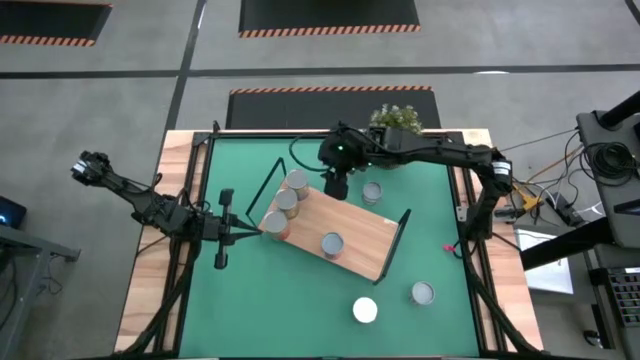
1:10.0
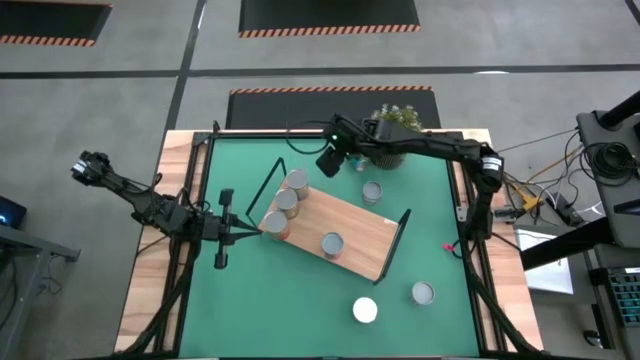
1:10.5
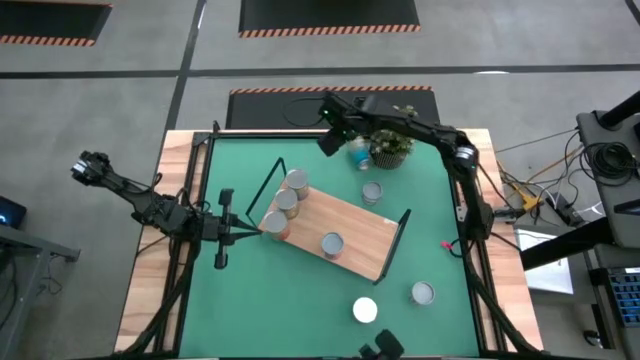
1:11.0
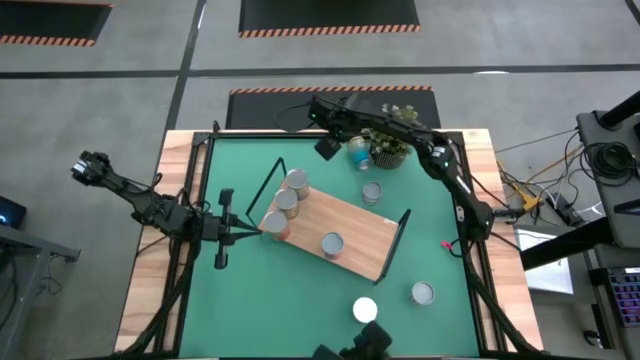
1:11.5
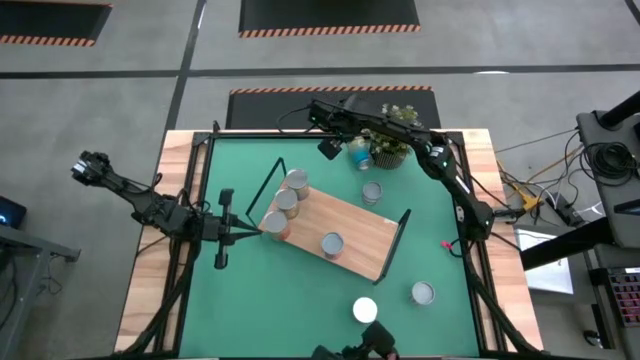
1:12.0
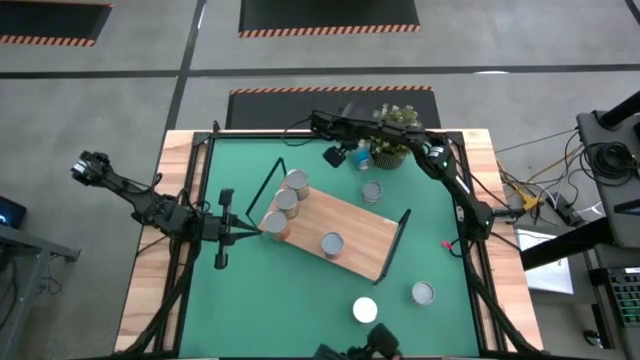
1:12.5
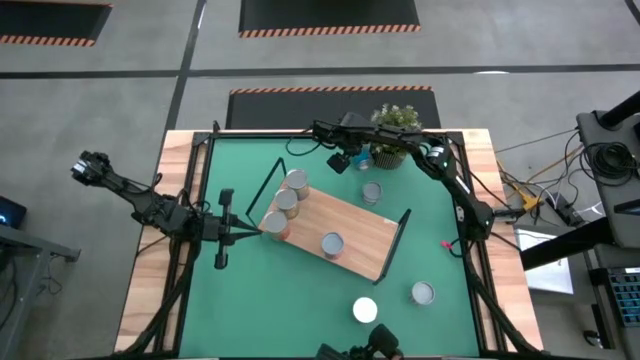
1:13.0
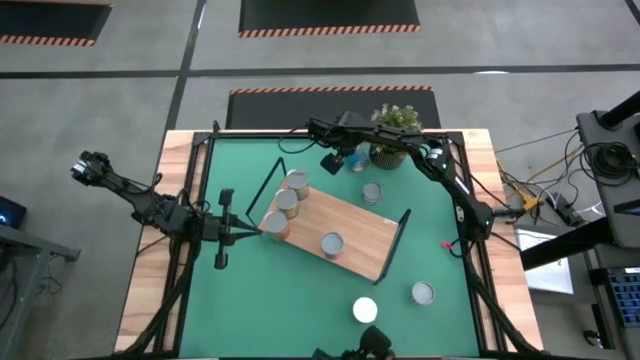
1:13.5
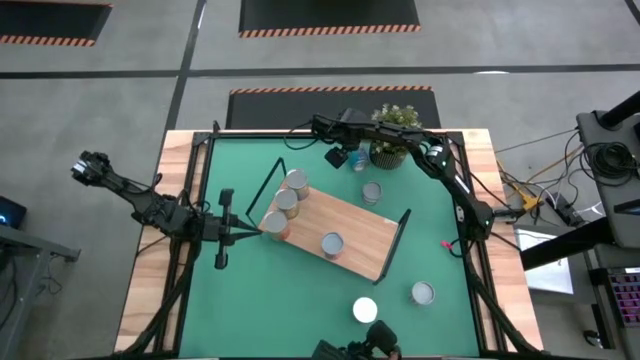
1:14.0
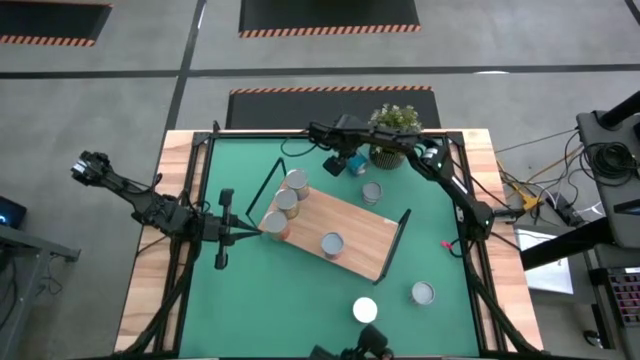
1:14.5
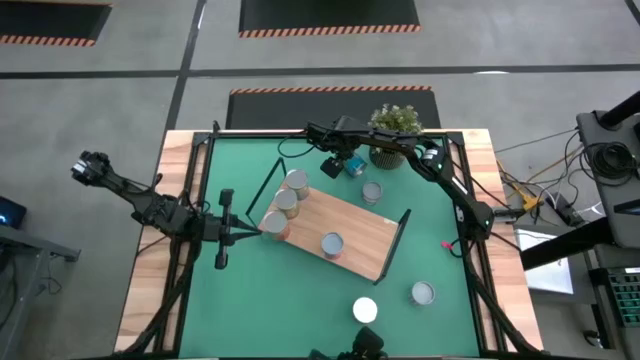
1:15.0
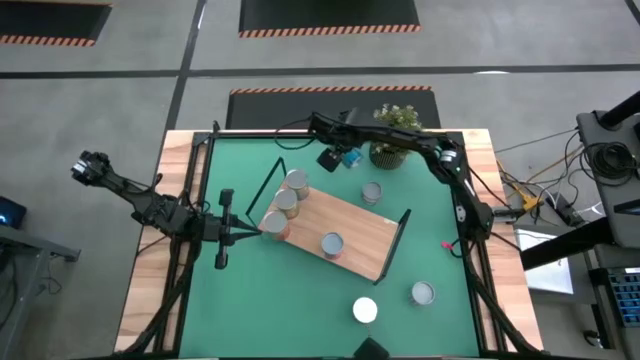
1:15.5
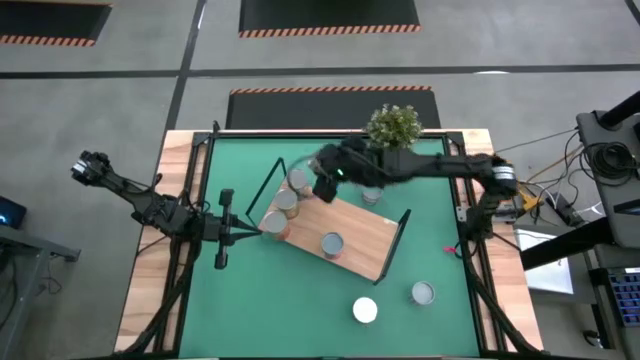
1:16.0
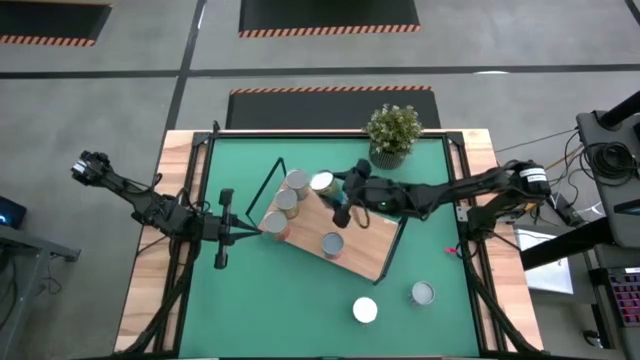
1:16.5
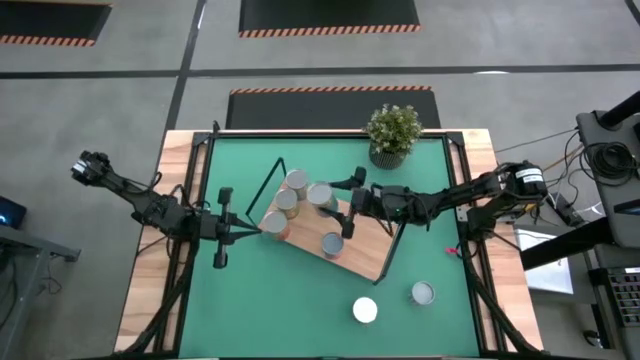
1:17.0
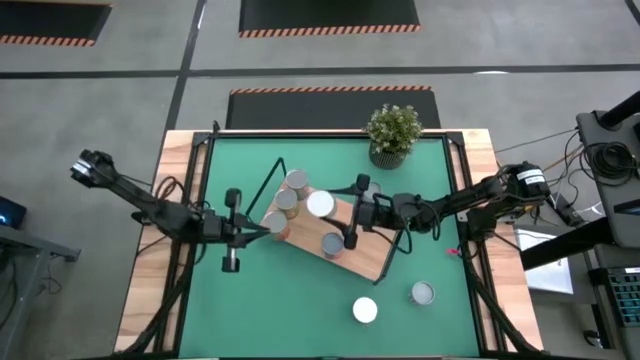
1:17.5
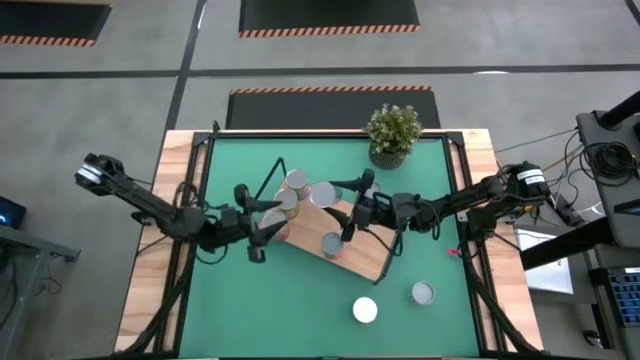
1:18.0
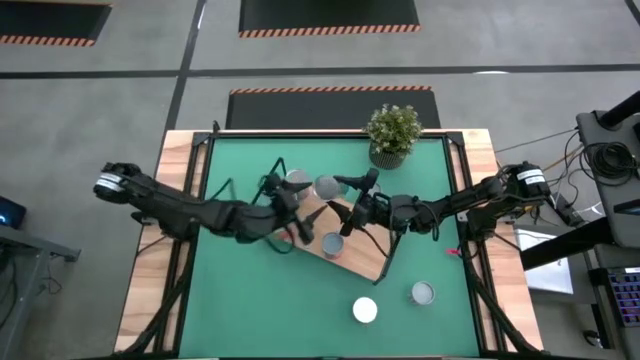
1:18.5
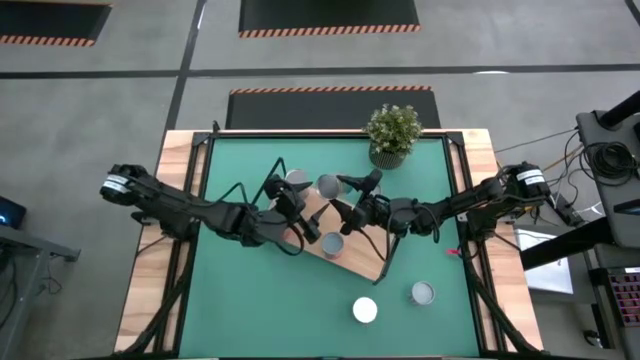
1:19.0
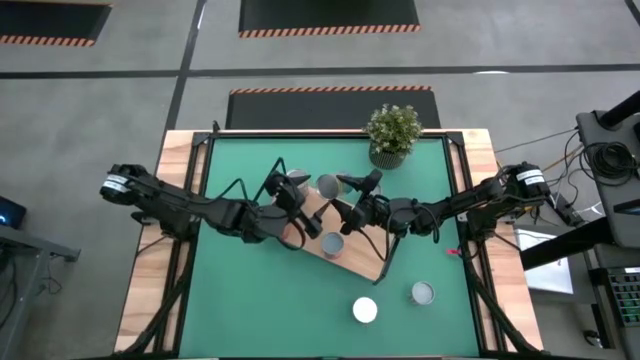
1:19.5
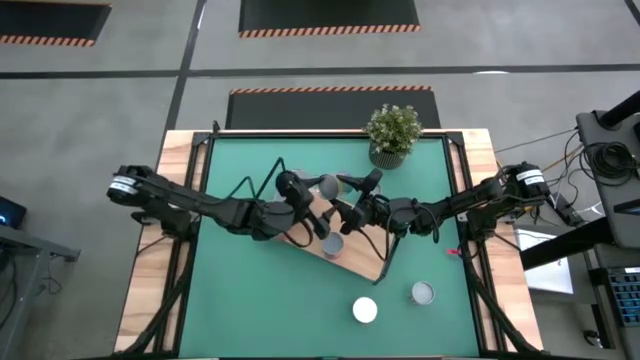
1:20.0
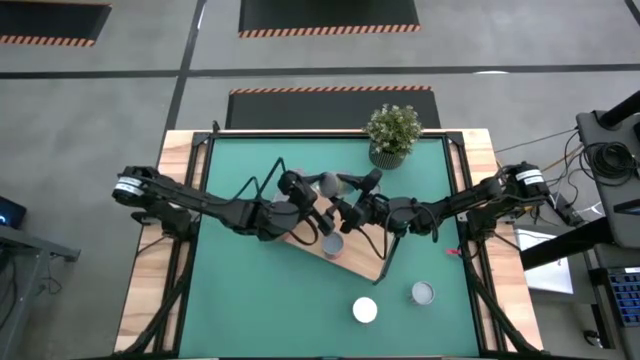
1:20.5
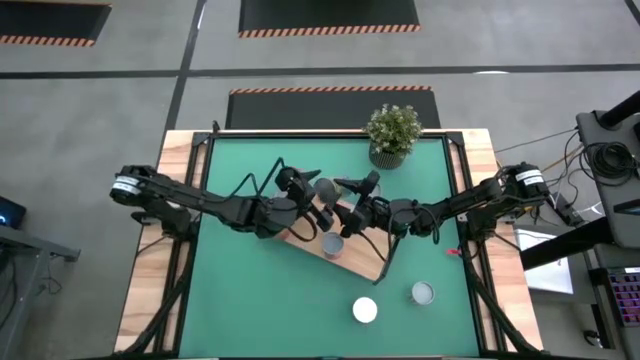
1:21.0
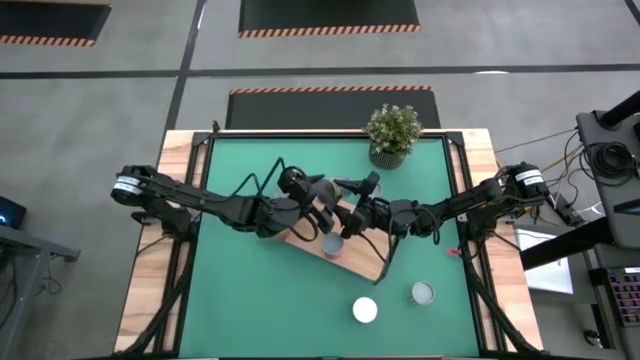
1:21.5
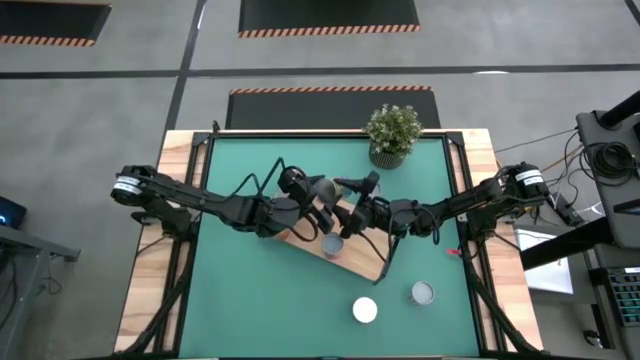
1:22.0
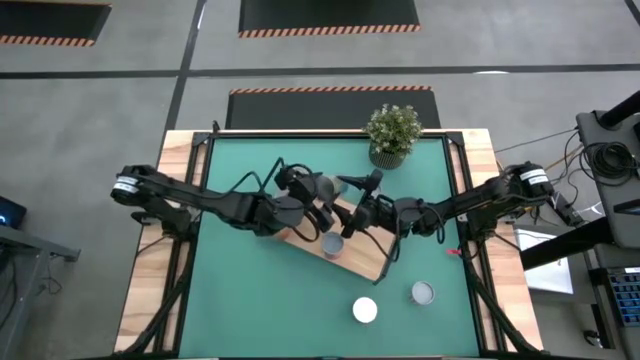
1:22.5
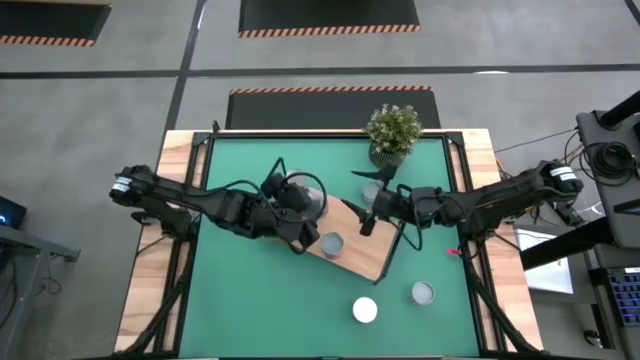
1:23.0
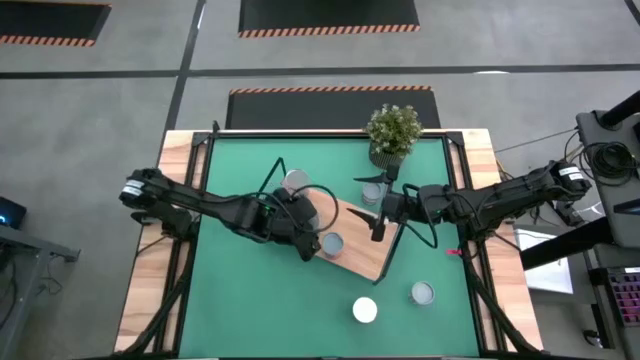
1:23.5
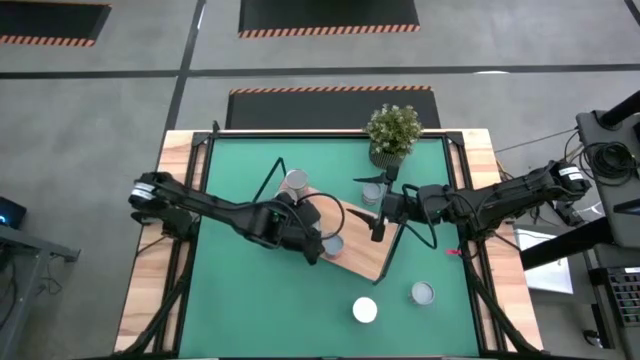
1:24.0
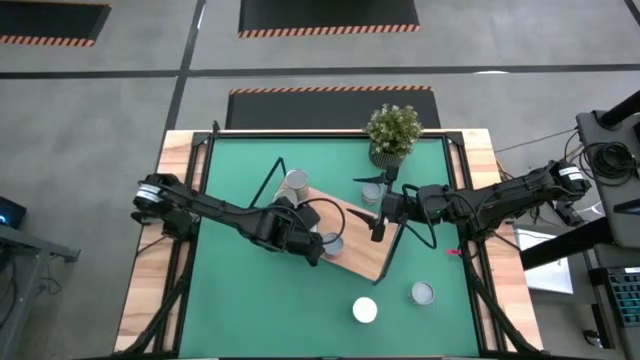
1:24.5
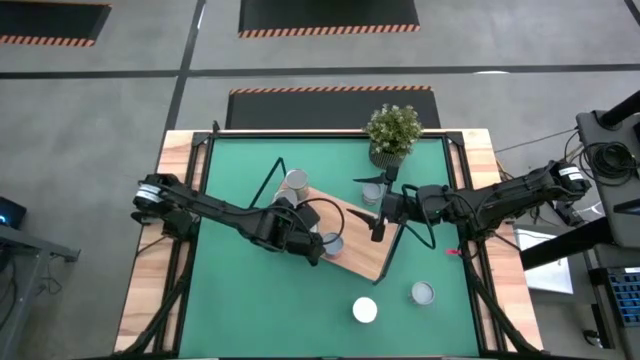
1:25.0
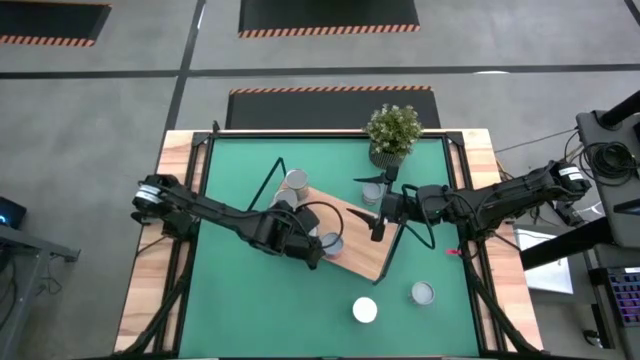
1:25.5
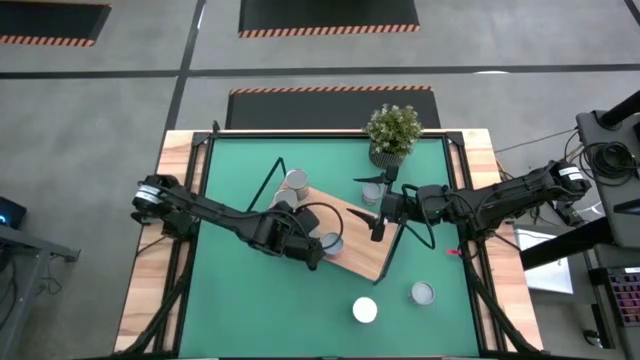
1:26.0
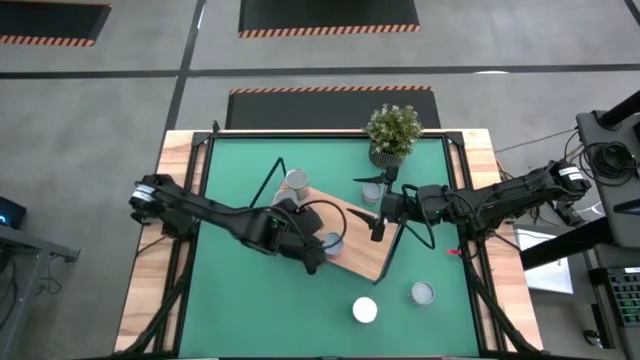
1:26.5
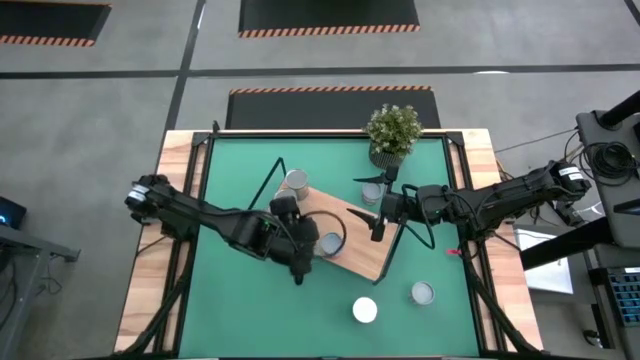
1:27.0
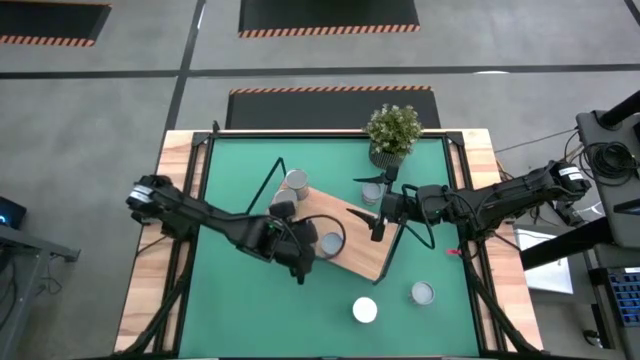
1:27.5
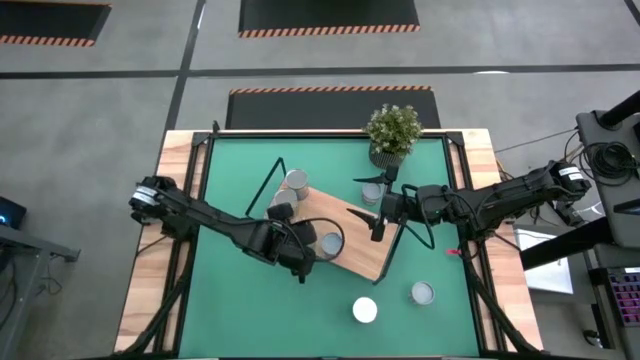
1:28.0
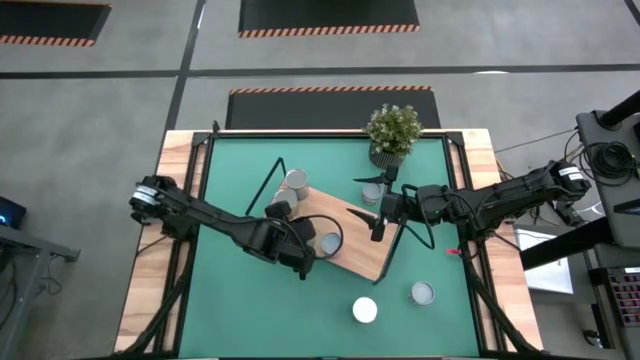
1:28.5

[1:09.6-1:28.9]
Task: Pick and place cans onto a shelf
Put the canned cherries on the shelf

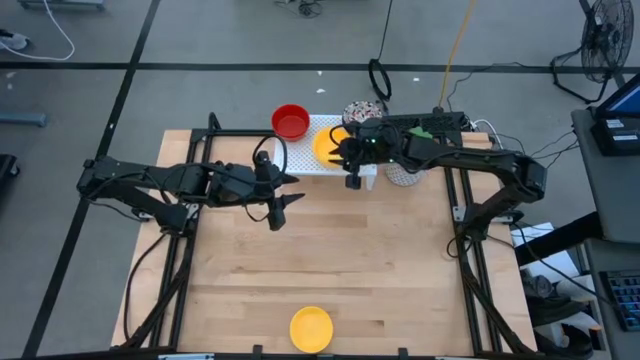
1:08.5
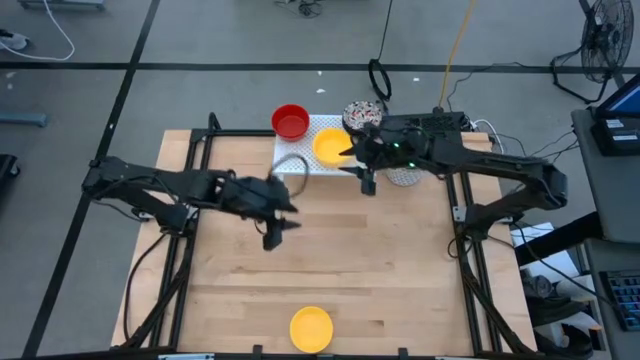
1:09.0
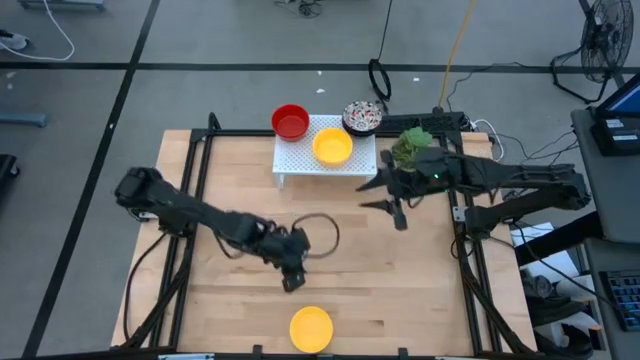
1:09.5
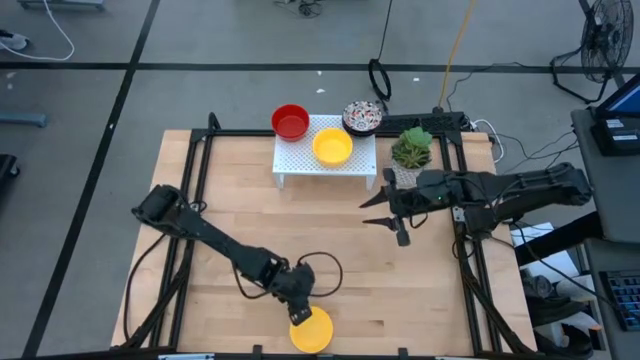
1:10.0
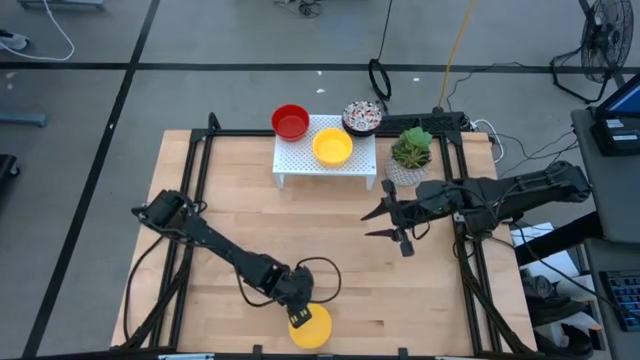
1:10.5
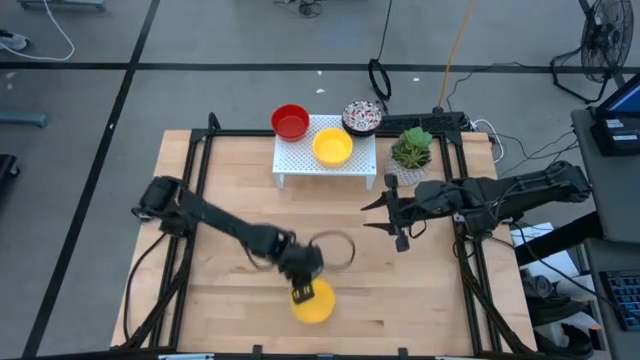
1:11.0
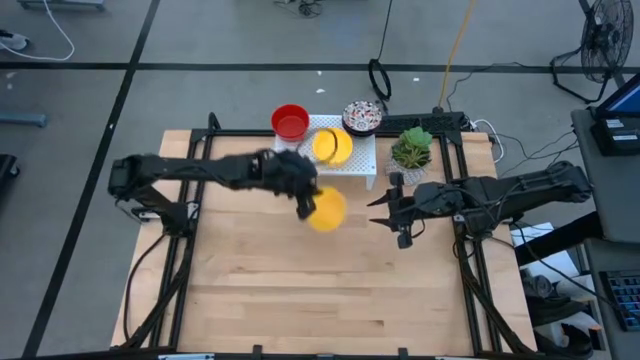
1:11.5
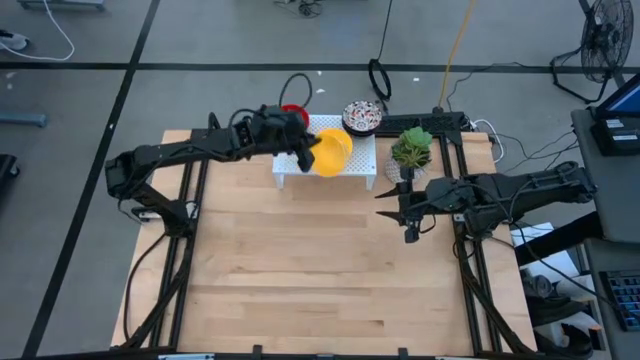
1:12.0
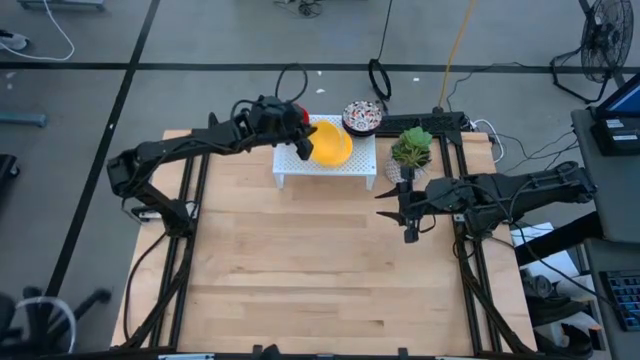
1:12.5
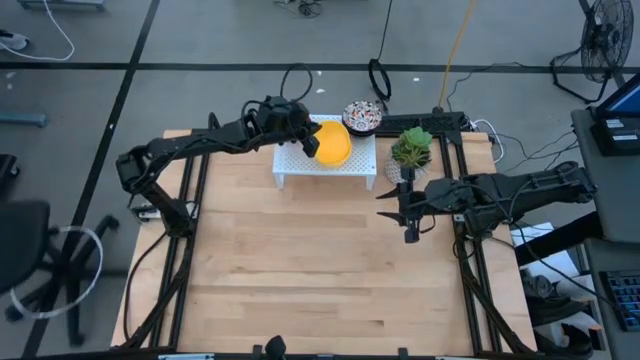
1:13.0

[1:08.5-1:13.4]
Task: Pick & Place Mini bowls
Stack the yellow bowl on the yellow bowls on the shelf
